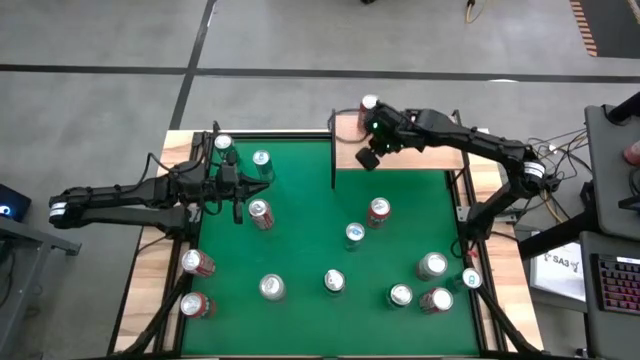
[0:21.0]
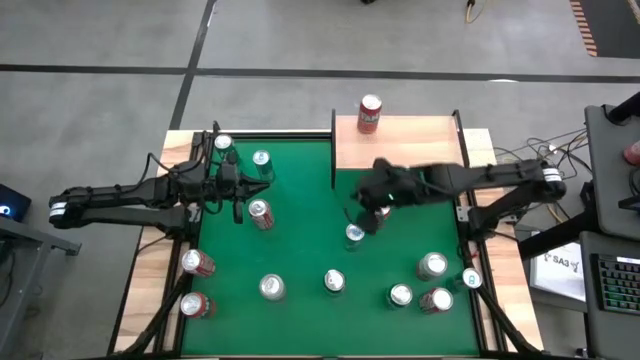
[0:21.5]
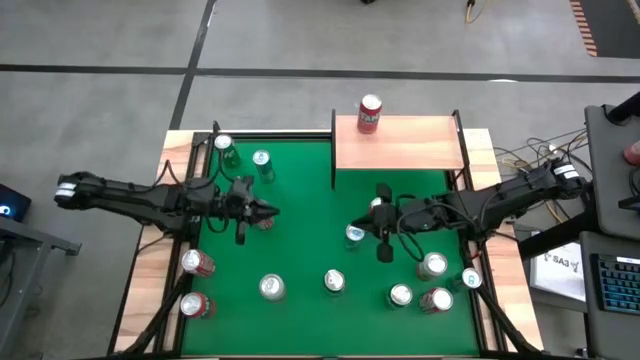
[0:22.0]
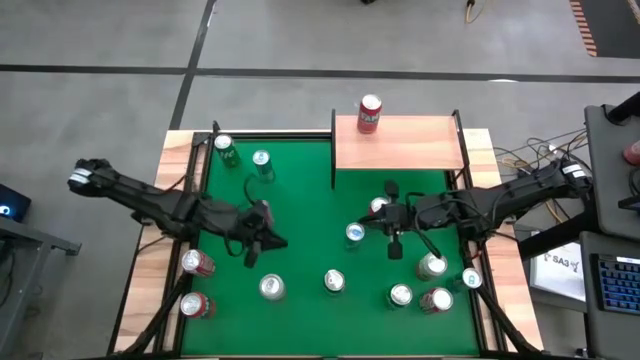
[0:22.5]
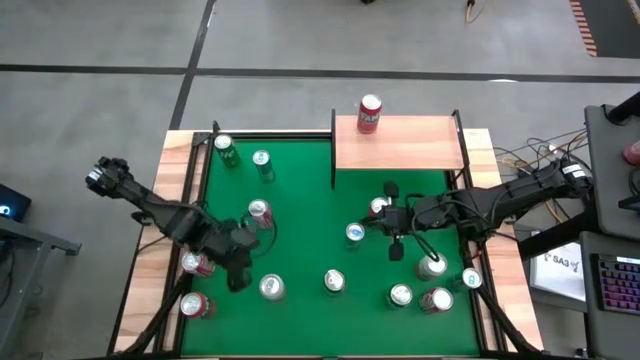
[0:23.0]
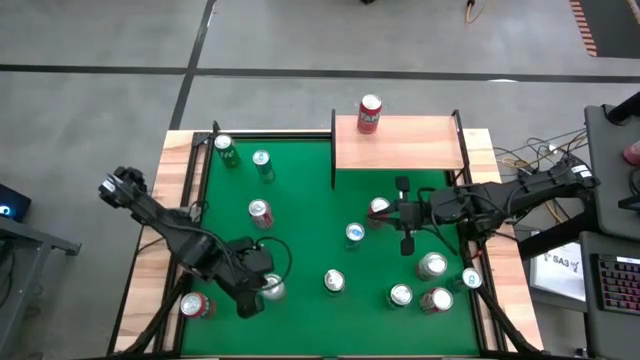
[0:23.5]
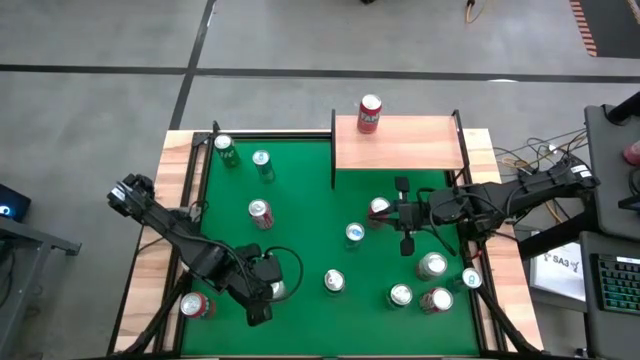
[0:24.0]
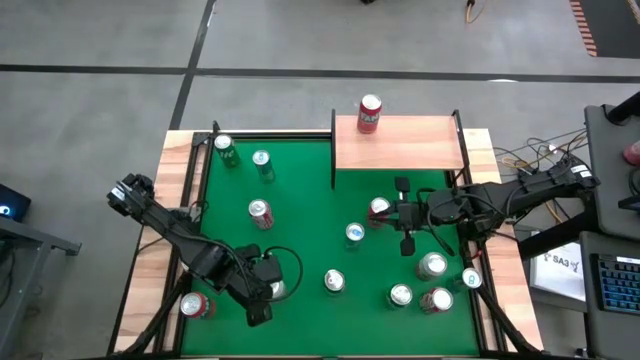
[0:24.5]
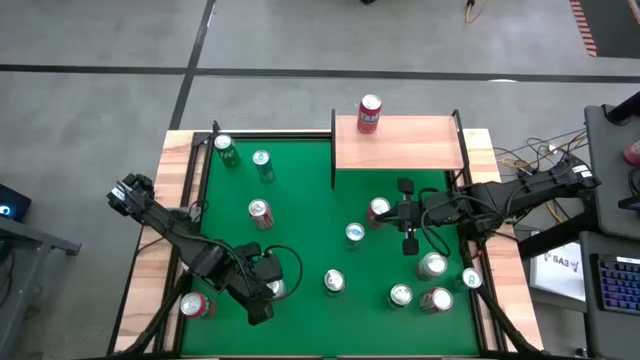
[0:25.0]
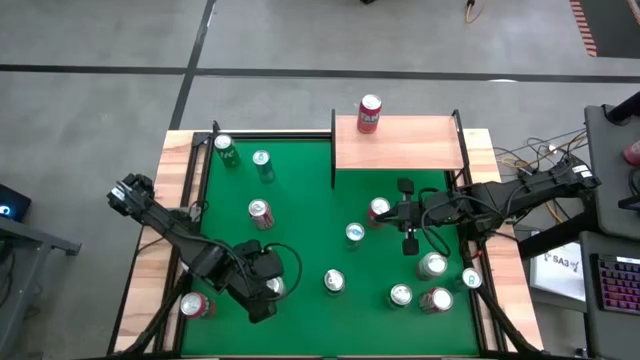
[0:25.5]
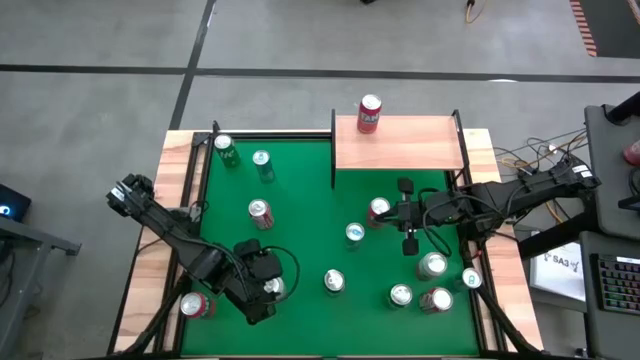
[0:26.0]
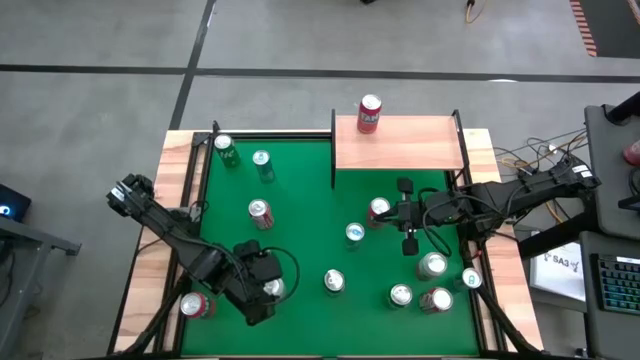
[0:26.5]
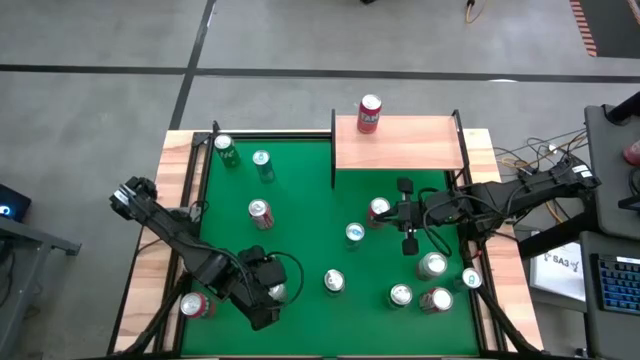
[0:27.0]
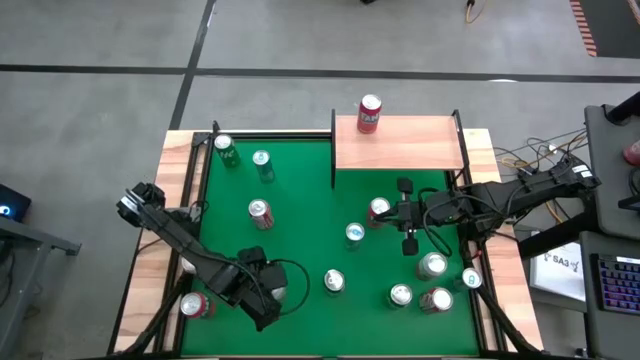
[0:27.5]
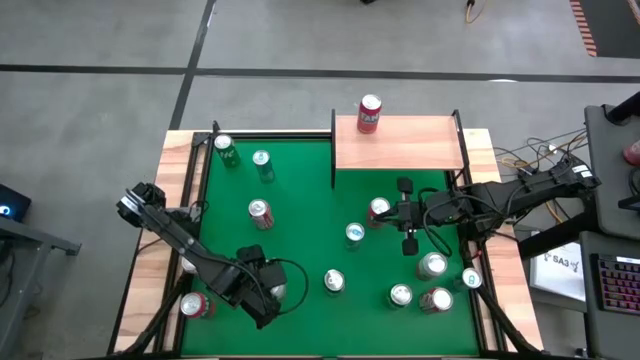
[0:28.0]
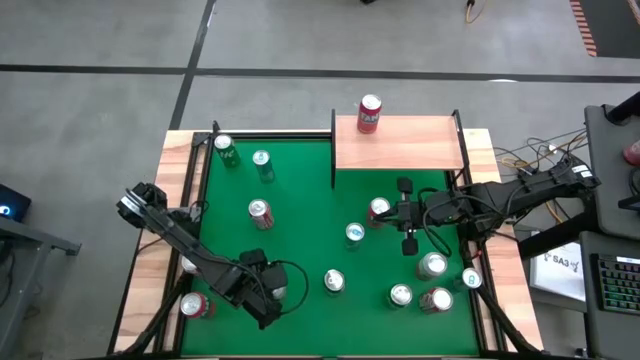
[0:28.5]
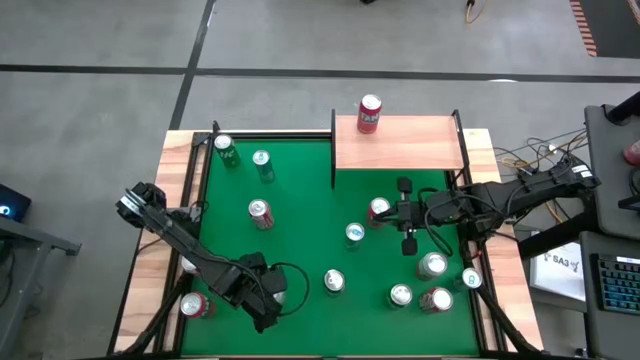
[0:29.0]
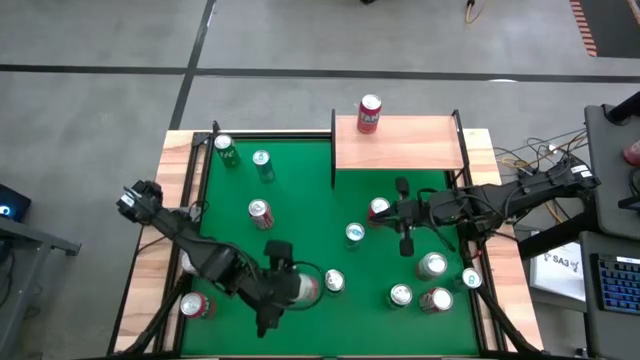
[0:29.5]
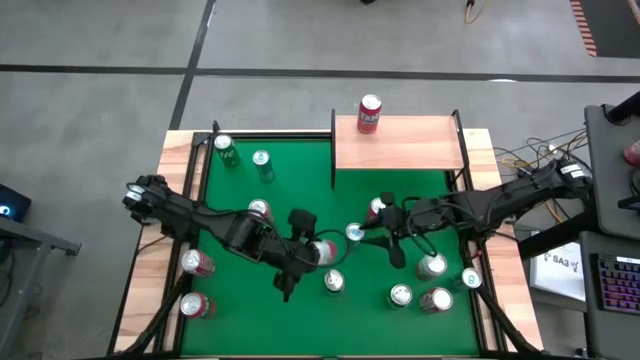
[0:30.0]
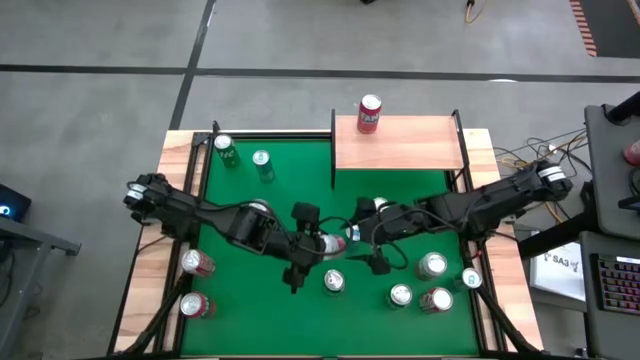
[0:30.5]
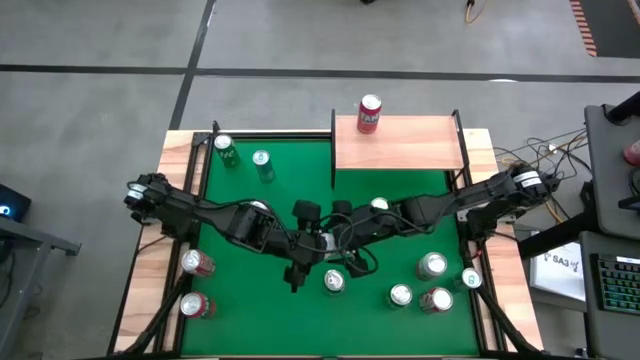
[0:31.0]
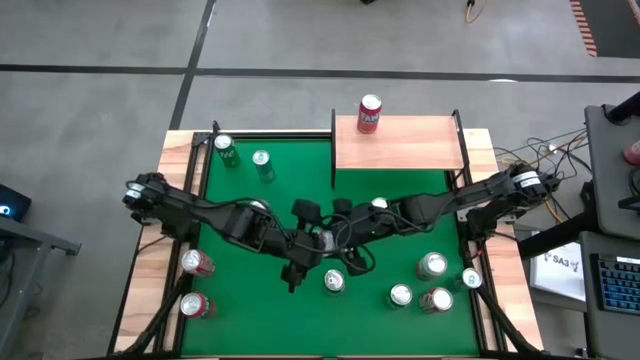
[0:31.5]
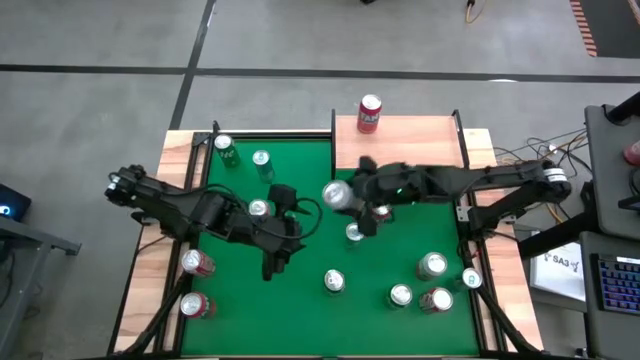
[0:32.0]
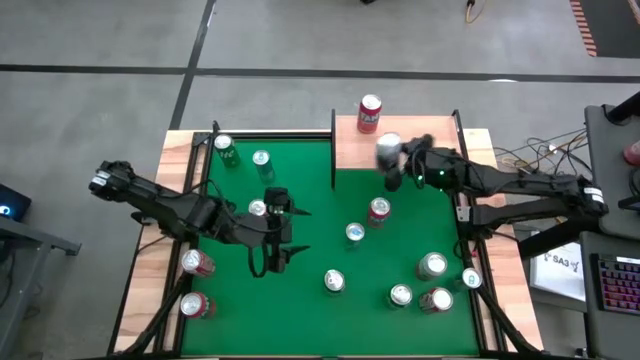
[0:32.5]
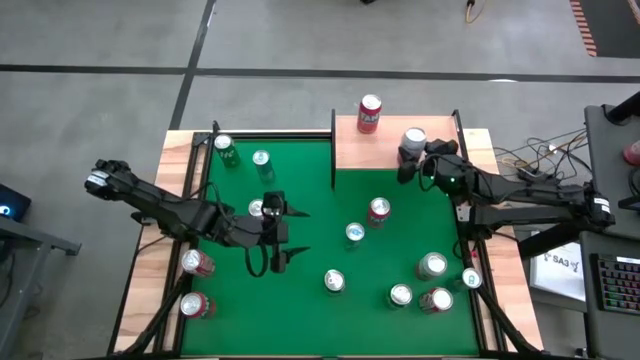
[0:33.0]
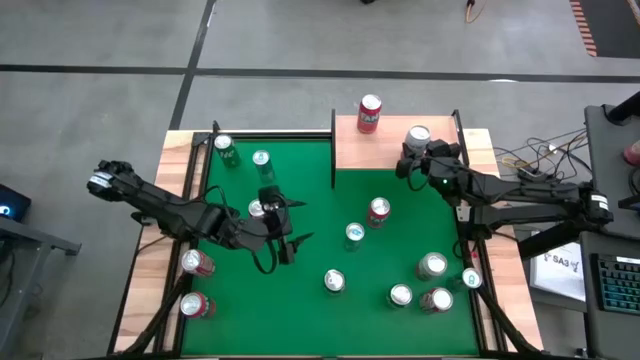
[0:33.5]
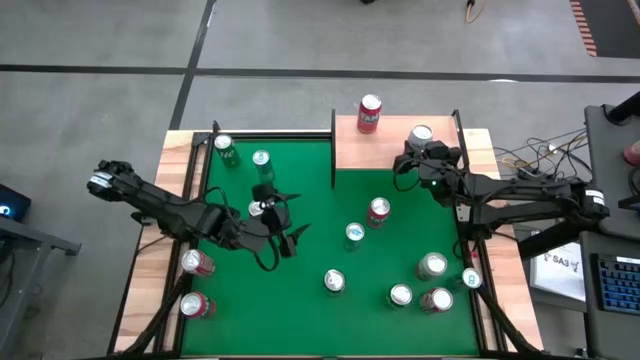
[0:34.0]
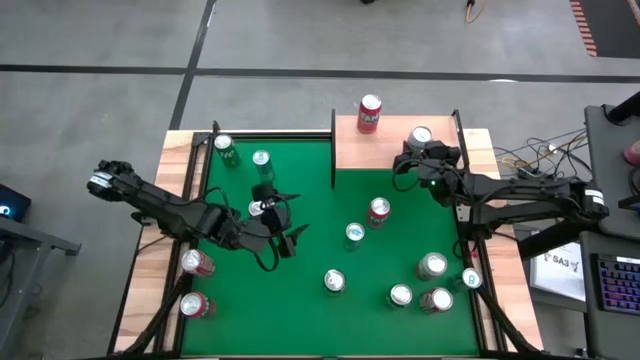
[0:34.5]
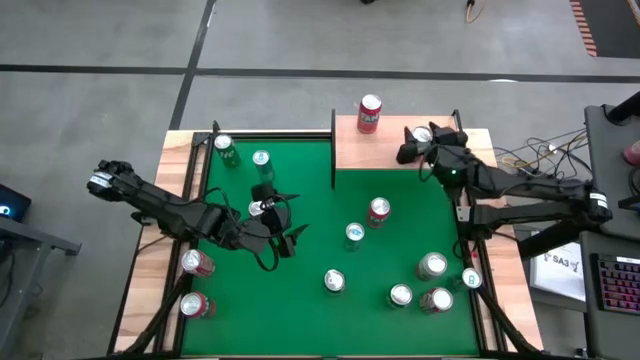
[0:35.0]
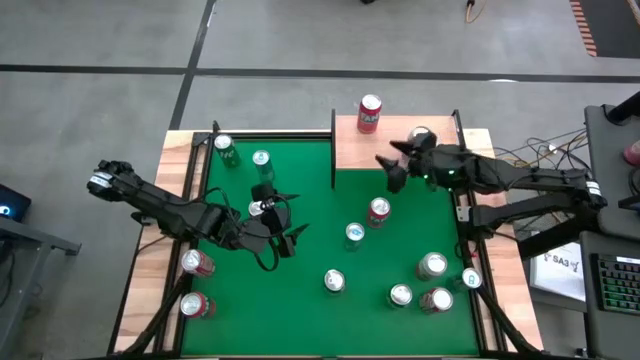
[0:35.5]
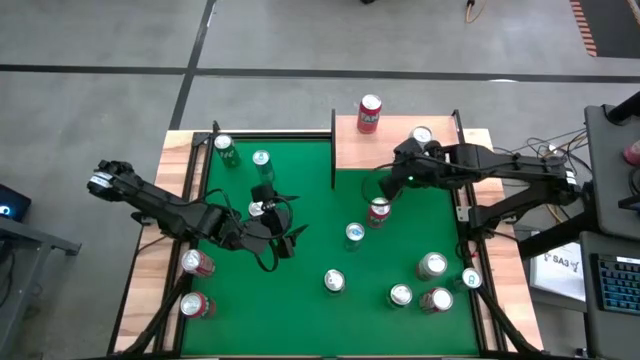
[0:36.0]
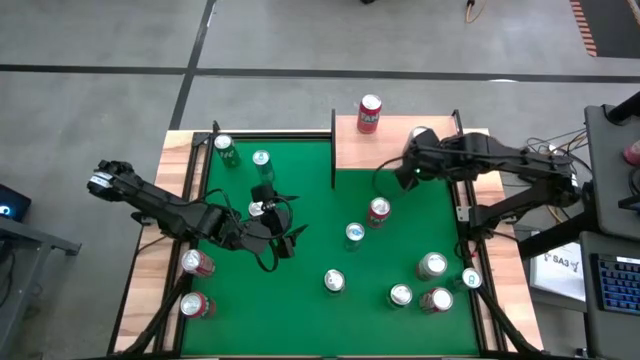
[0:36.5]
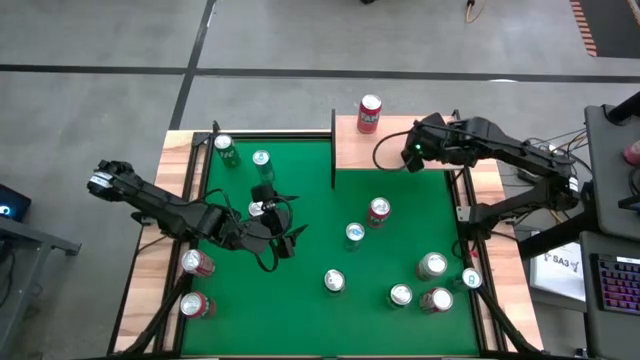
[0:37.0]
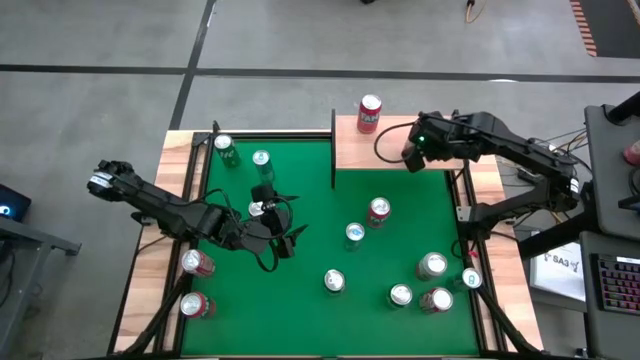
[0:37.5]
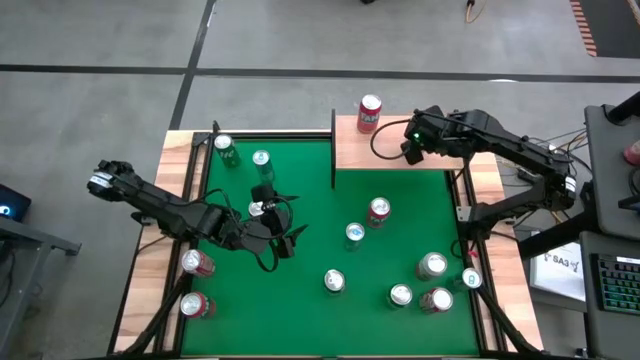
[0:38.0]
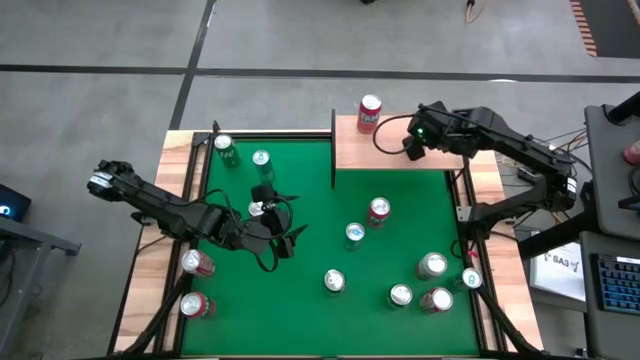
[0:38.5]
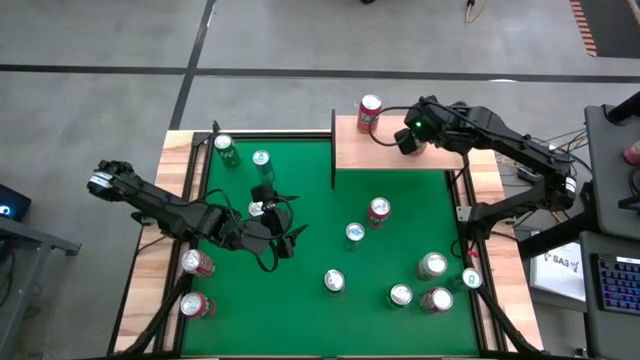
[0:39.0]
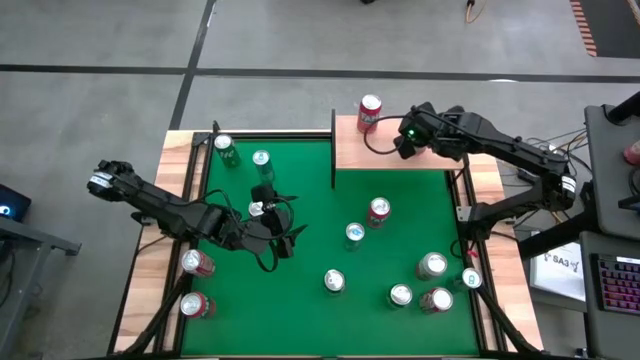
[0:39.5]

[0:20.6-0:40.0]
Task: Place canned beverage on shelf
Put the left pink-white soda can on the shelf

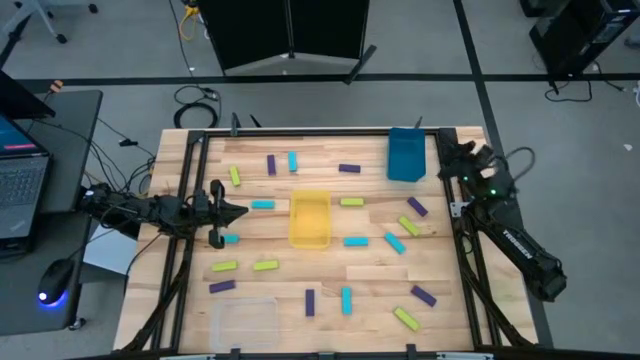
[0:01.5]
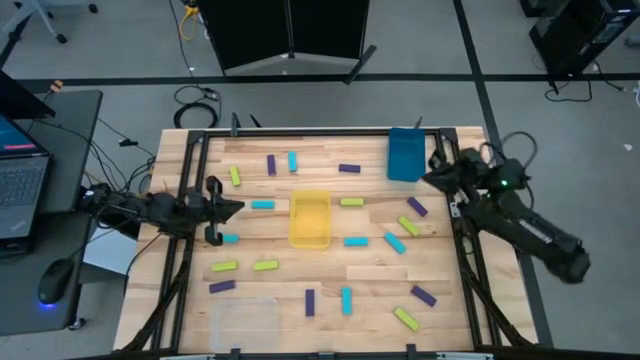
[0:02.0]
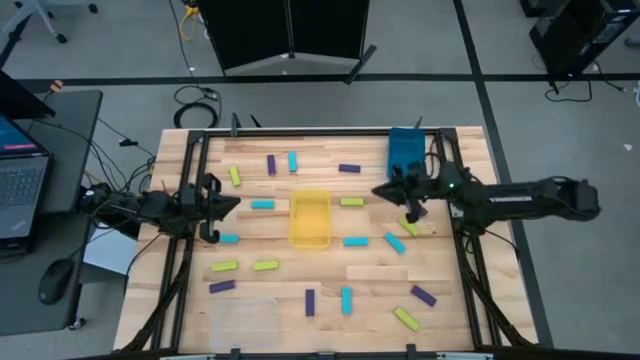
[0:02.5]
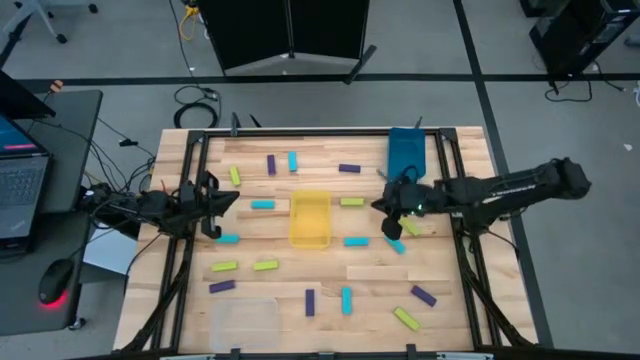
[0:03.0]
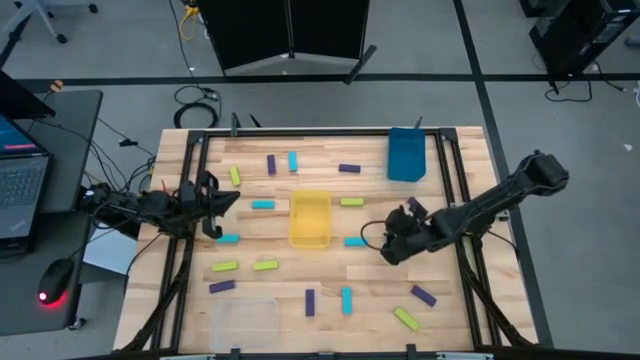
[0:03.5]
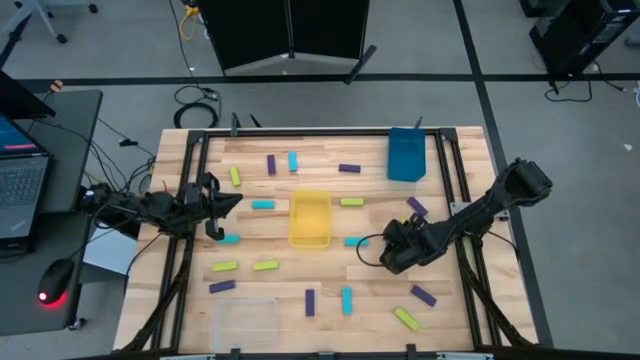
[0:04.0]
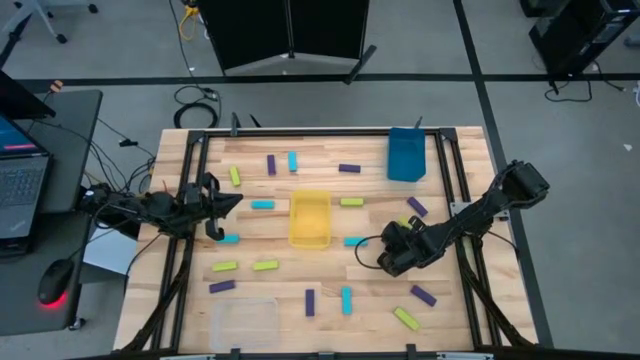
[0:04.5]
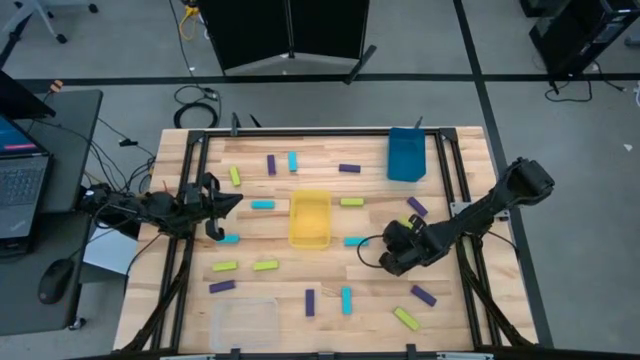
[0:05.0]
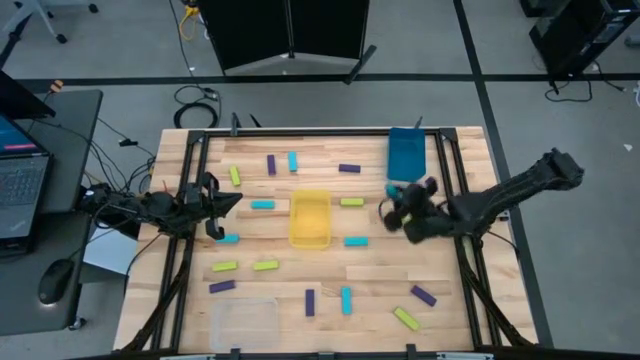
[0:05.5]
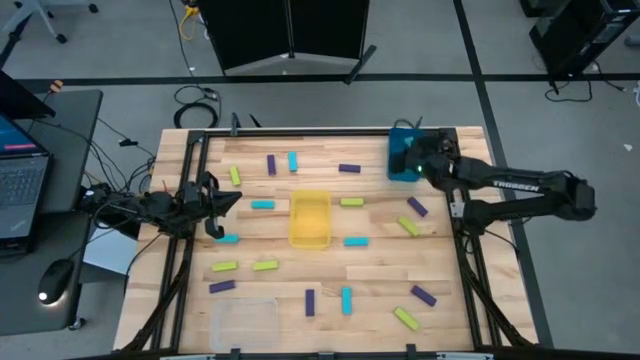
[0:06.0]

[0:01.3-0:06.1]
Task: Sort blocks
Put the light blue block into the blue bin
